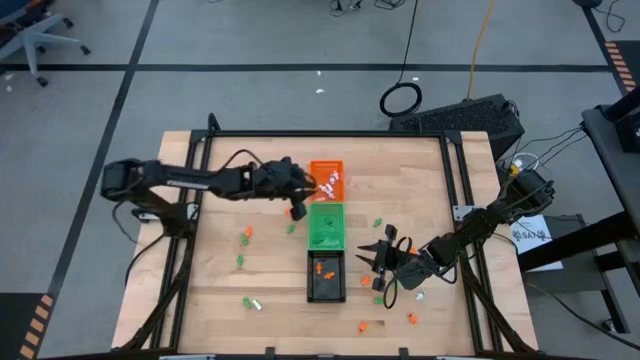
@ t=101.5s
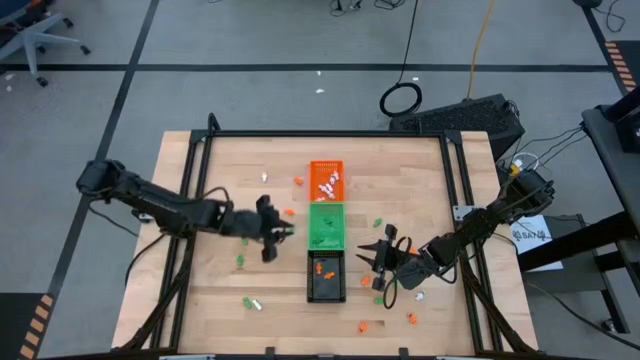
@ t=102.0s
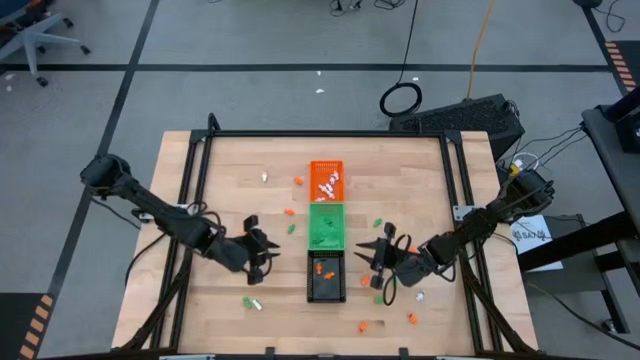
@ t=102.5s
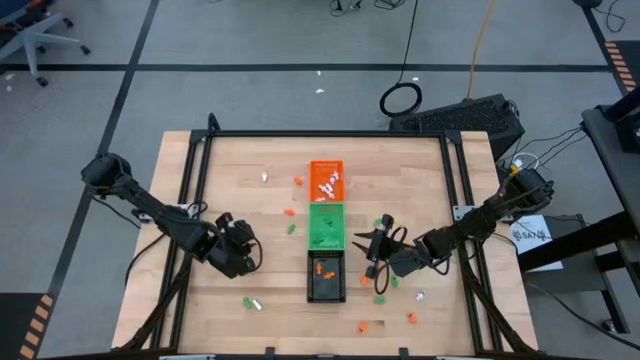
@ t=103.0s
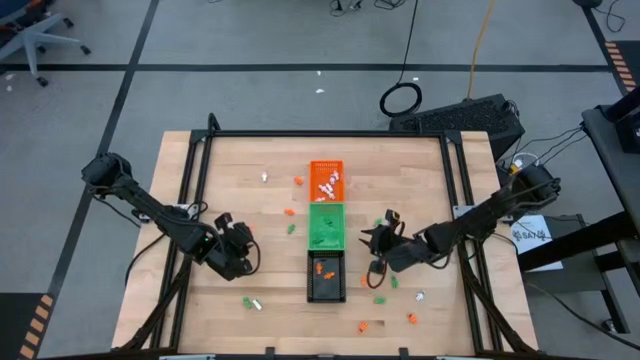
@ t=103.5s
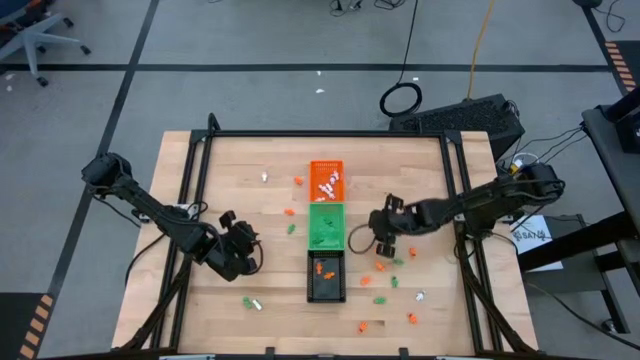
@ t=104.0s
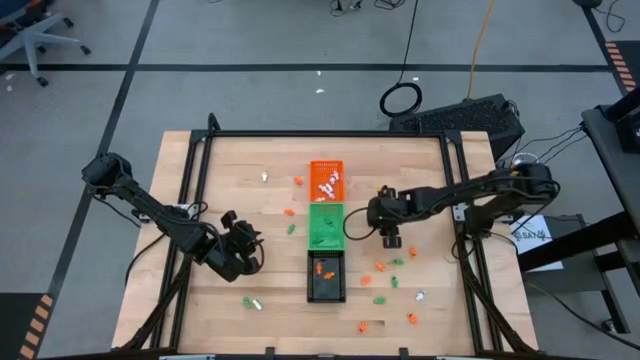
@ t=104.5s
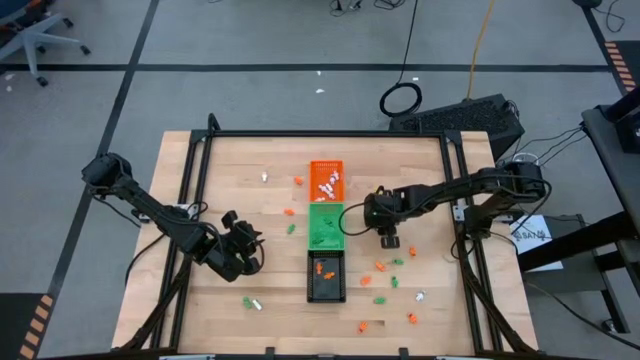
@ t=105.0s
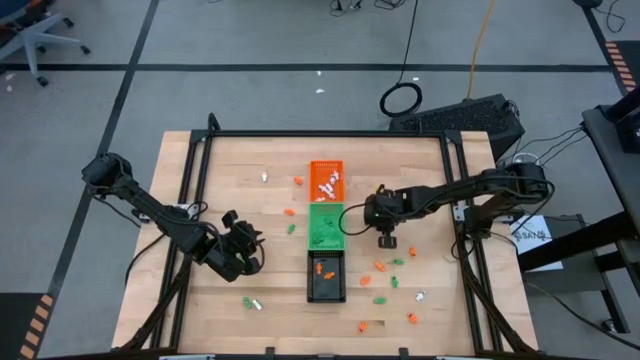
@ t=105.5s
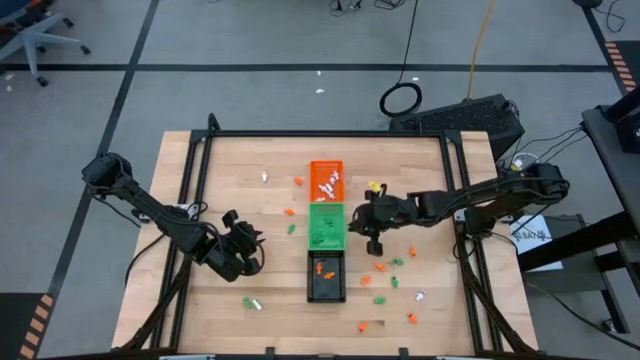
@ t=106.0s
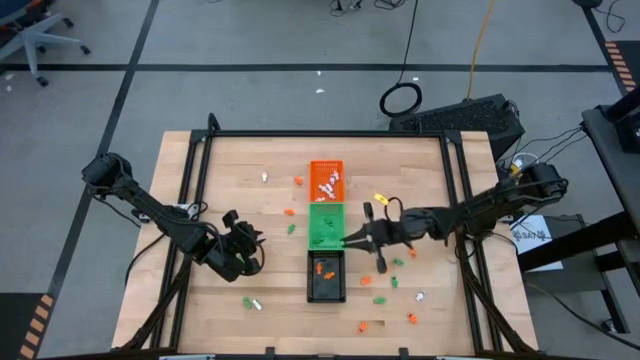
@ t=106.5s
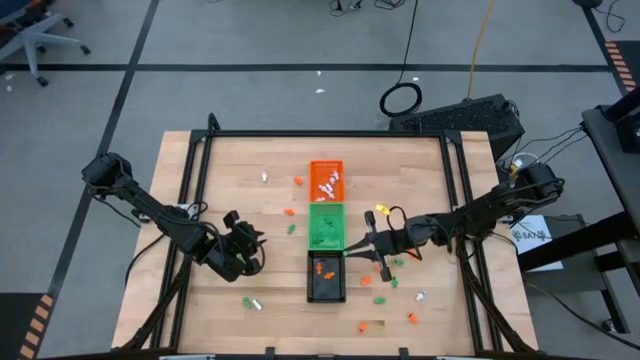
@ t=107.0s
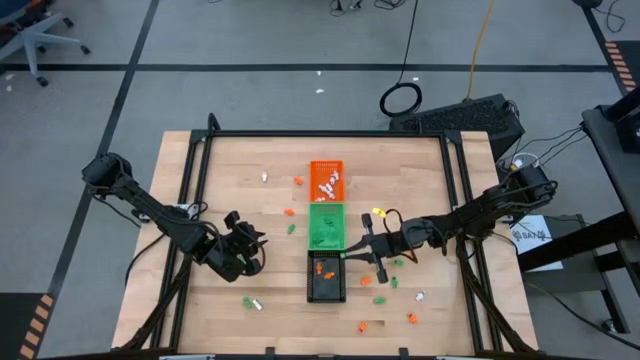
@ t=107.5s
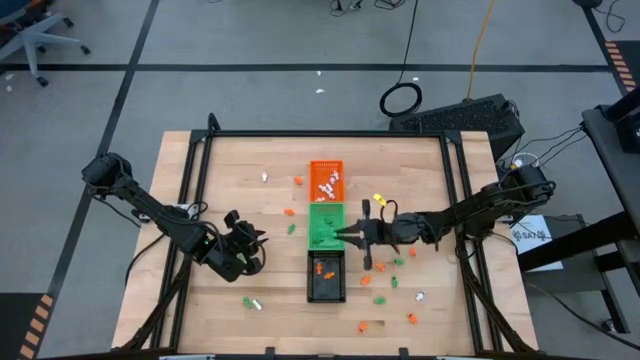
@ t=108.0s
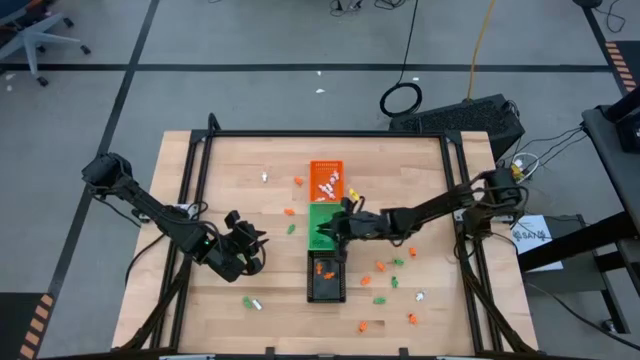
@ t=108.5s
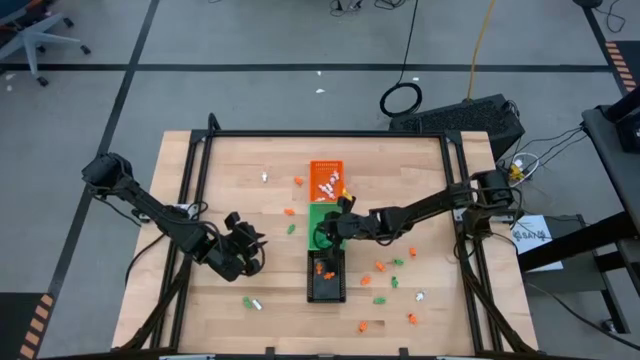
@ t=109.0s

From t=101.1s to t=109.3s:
Task: Sort Halloween decoration
Put the green skeleton toy into the green bin

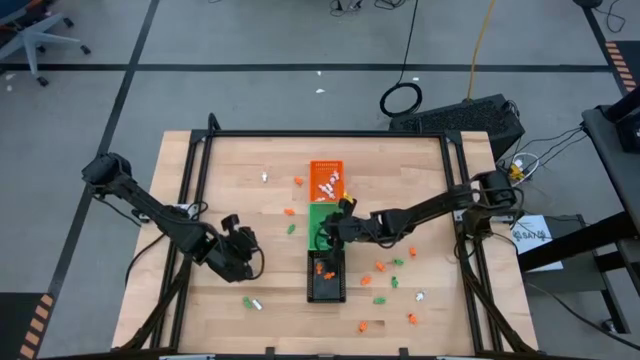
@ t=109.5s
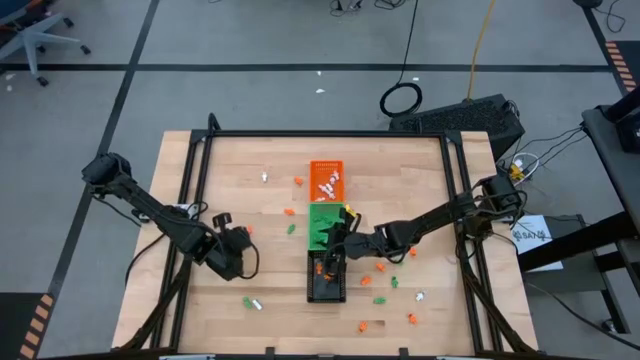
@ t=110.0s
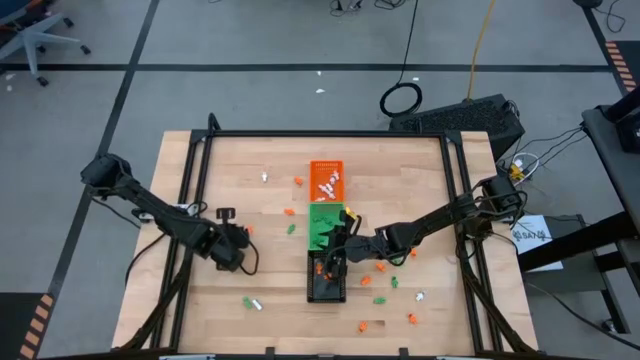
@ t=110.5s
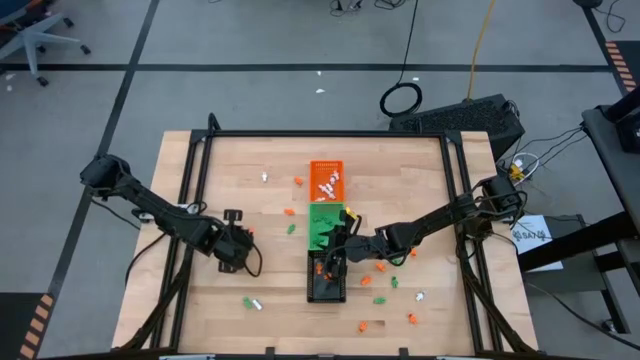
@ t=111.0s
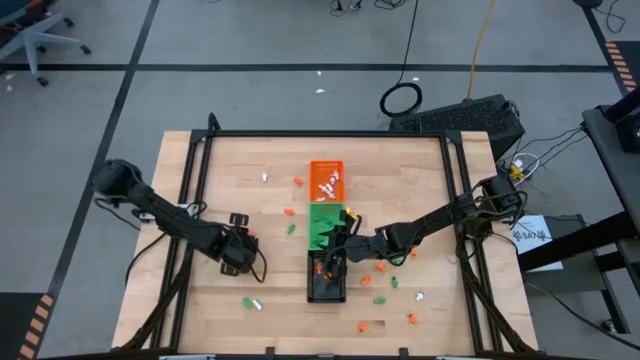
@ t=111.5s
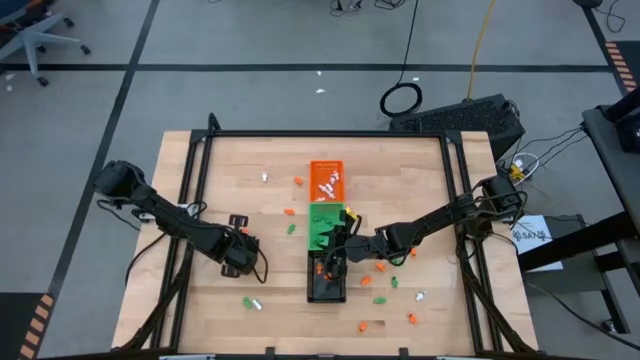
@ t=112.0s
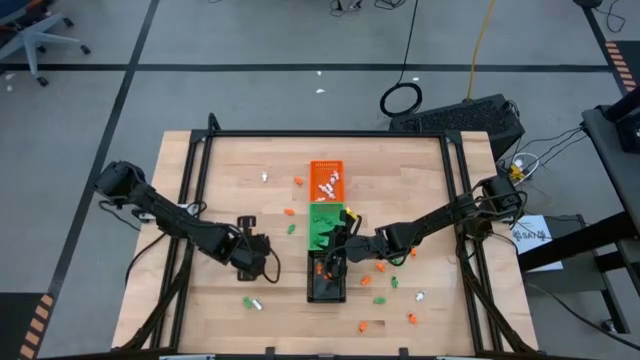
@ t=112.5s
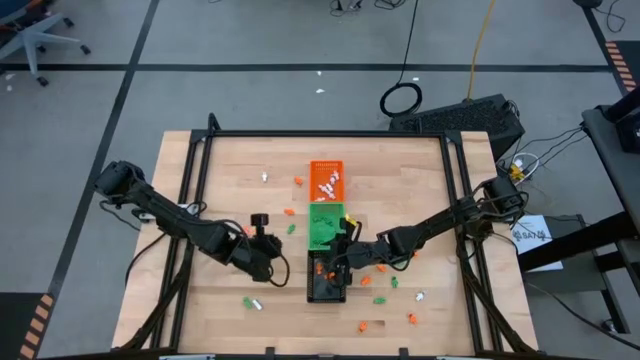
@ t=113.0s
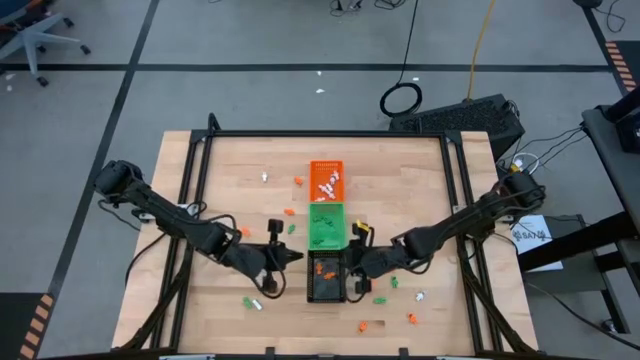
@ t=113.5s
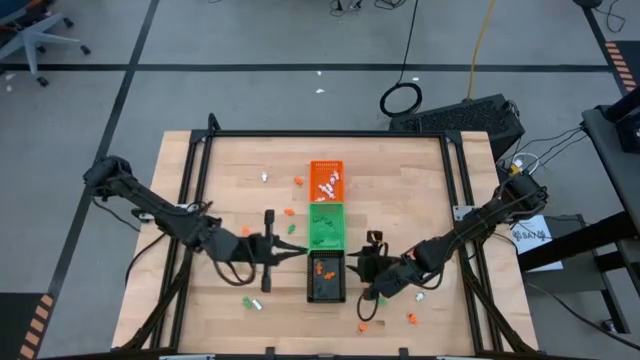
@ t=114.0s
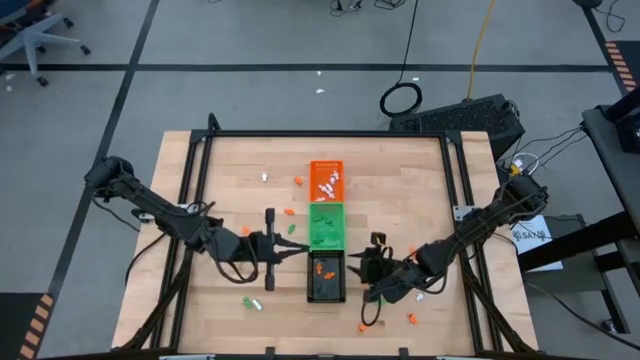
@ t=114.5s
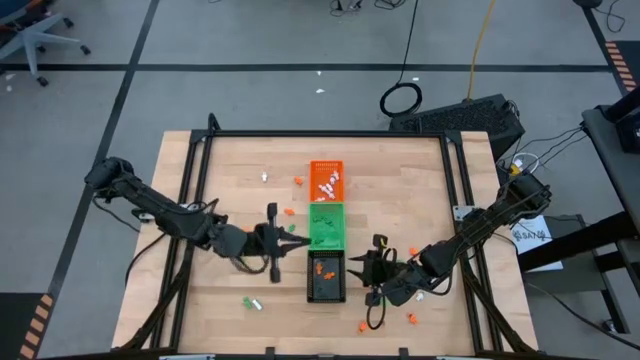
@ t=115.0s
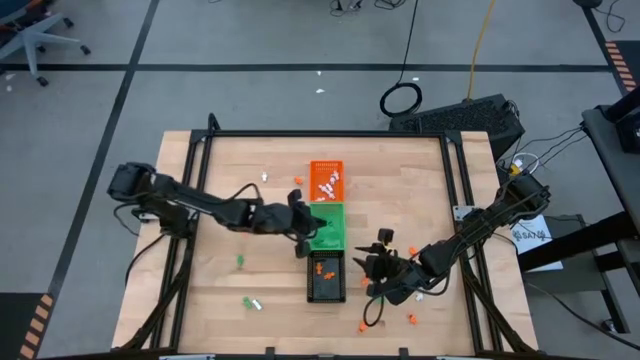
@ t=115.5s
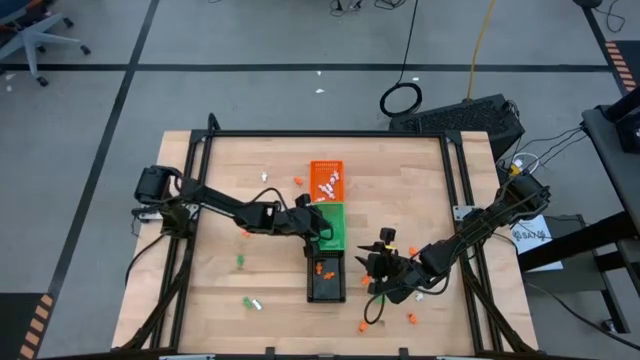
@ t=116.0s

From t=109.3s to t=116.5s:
Put the green skeleton toy into the green bin

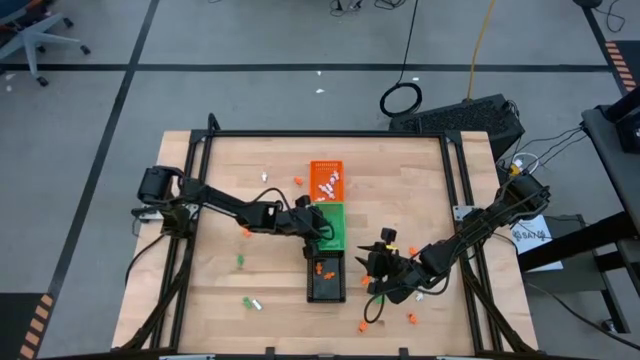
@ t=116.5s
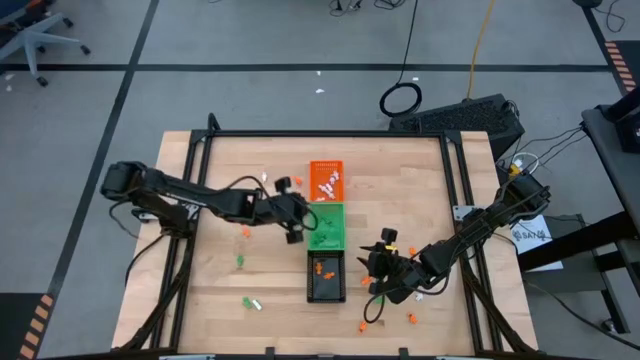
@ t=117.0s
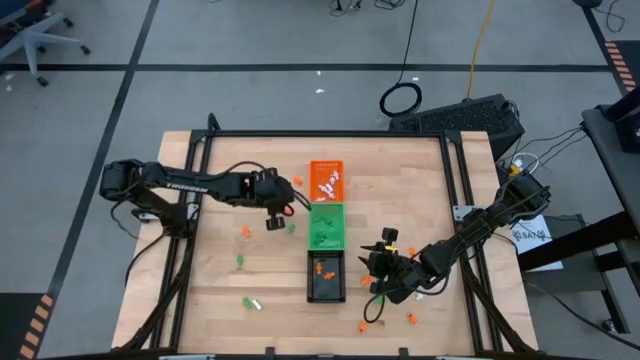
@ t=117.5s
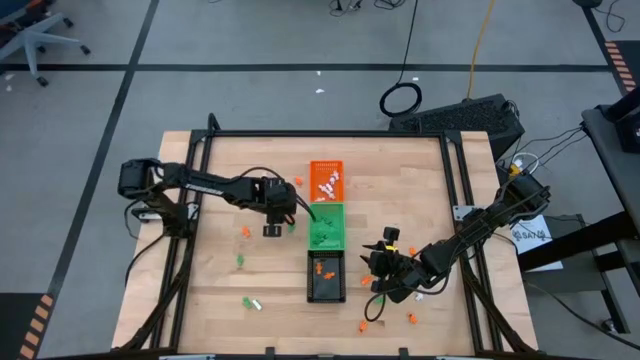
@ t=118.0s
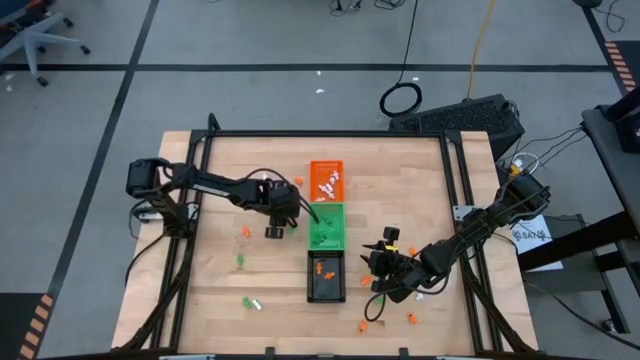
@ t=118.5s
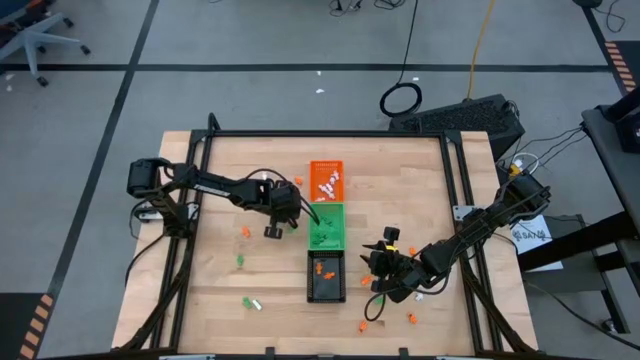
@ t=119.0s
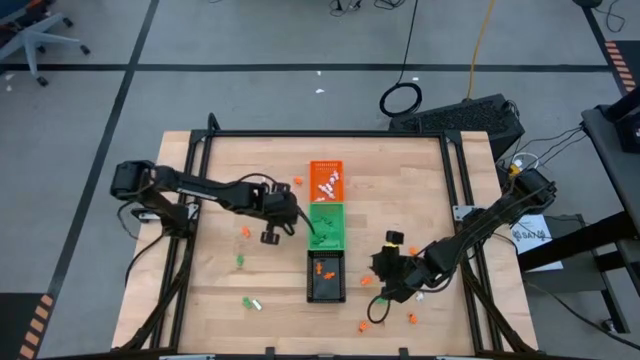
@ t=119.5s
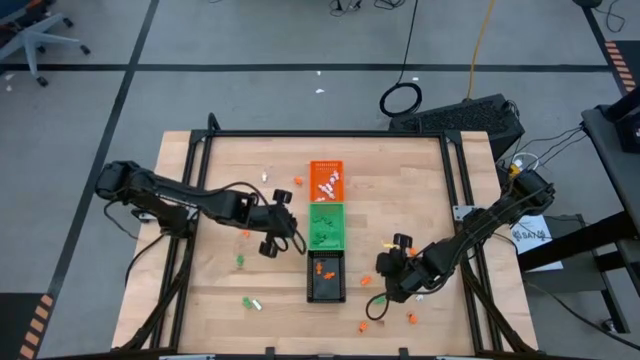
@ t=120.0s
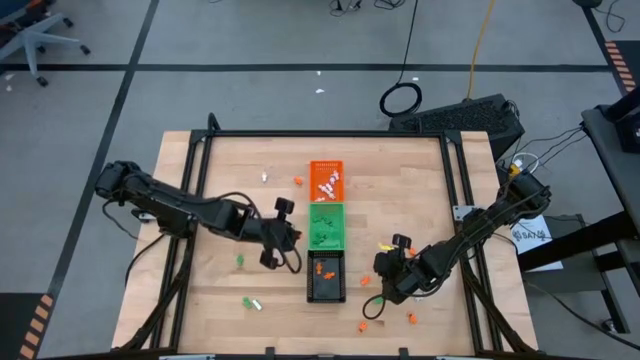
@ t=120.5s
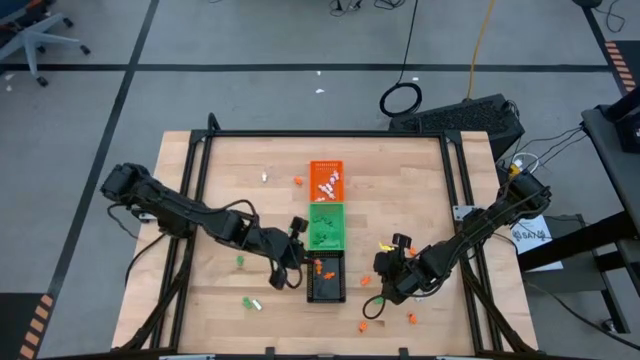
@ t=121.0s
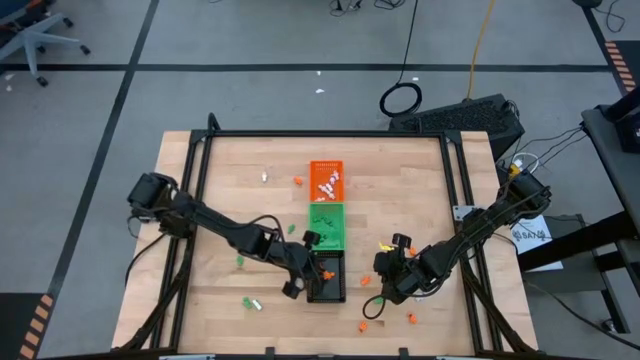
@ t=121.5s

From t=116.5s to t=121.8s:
Put the orange skeleton toy into the black bin

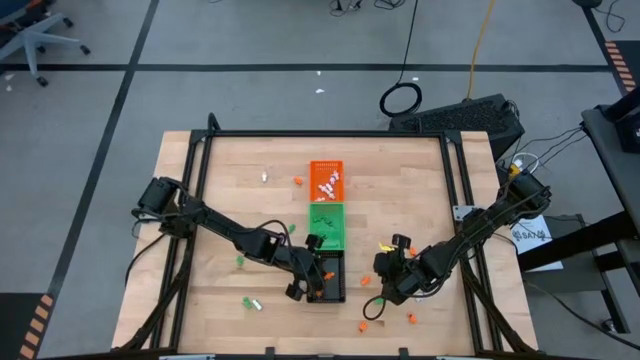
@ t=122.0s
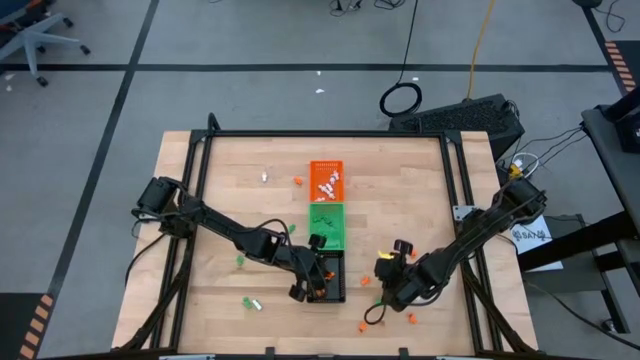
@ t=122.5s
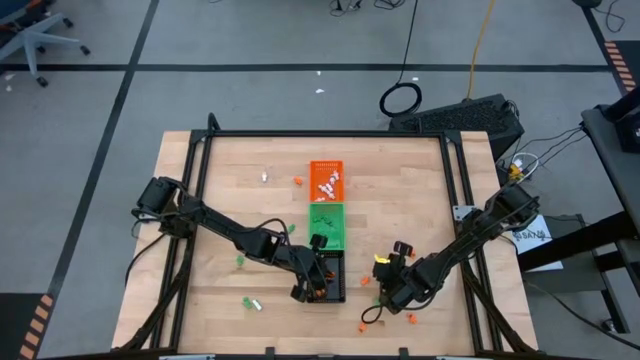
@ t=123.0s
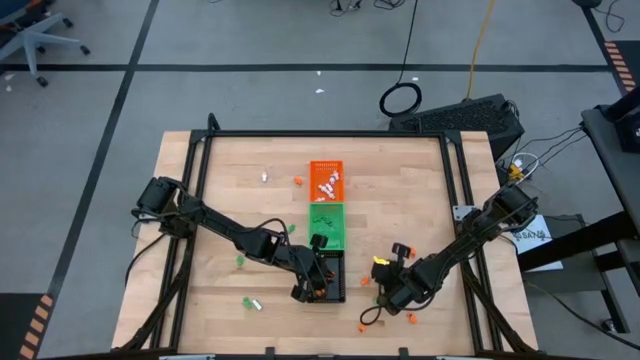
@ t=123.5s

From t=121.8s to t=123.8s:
Put the orange skeleton toy into the black bin
